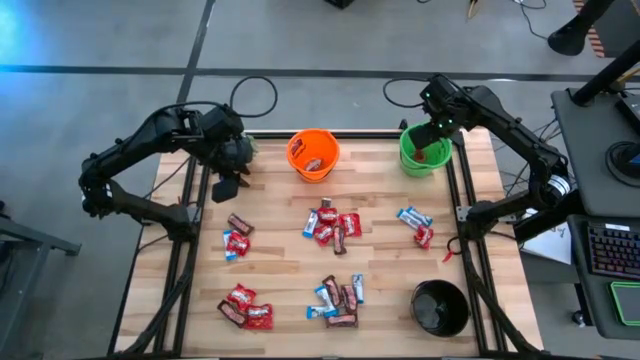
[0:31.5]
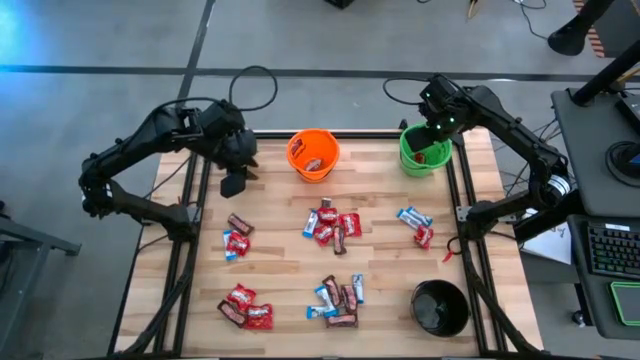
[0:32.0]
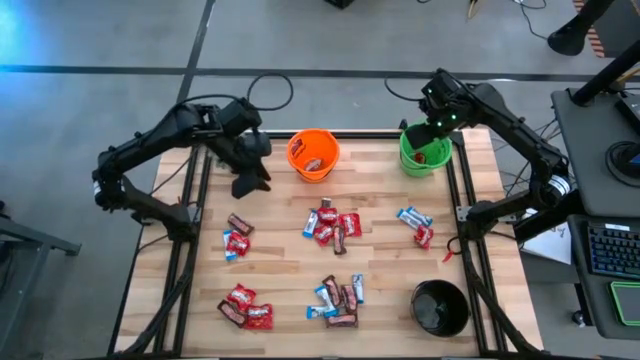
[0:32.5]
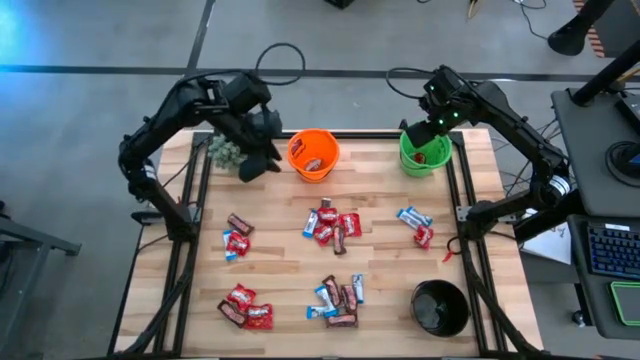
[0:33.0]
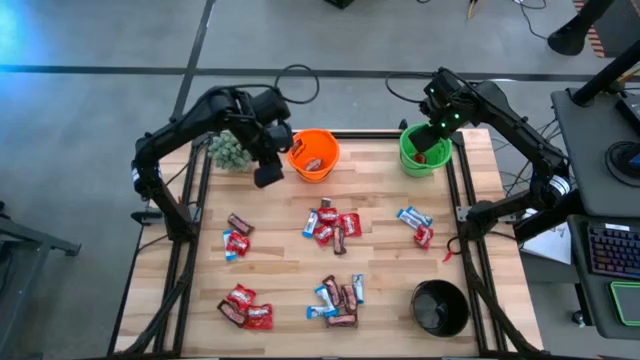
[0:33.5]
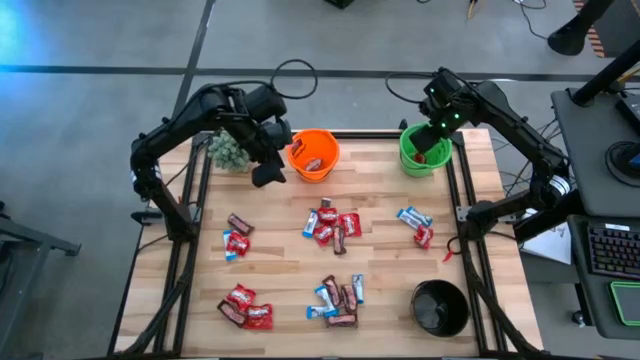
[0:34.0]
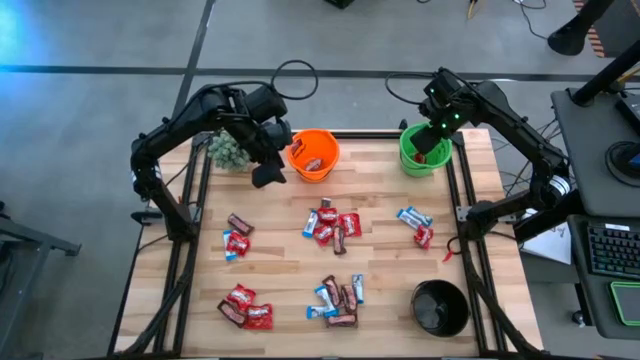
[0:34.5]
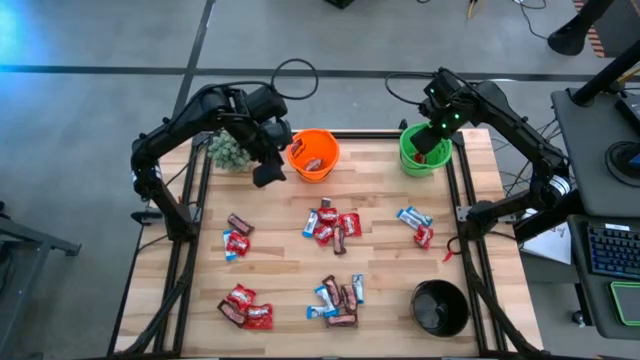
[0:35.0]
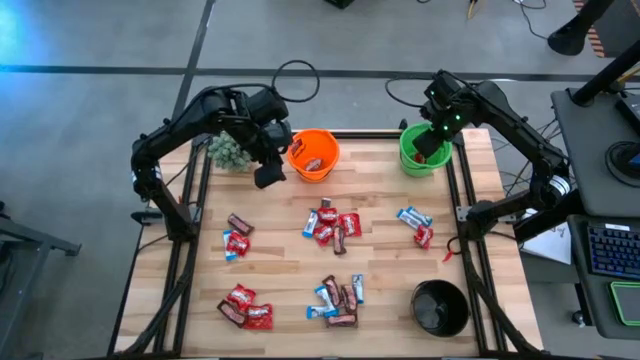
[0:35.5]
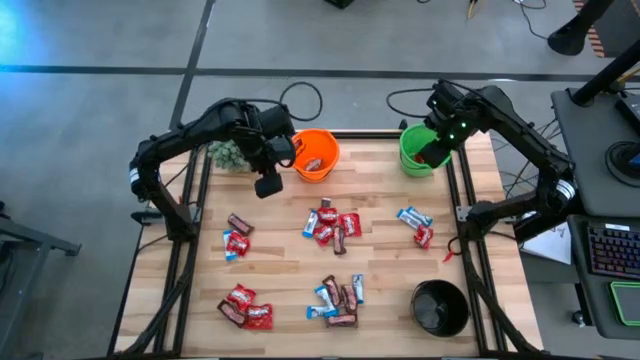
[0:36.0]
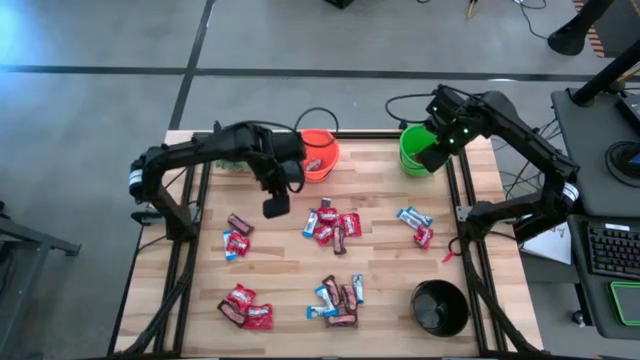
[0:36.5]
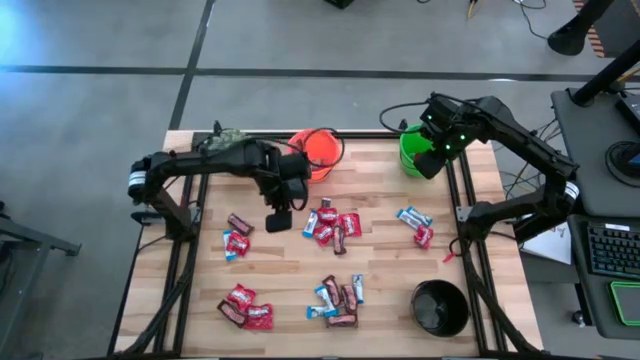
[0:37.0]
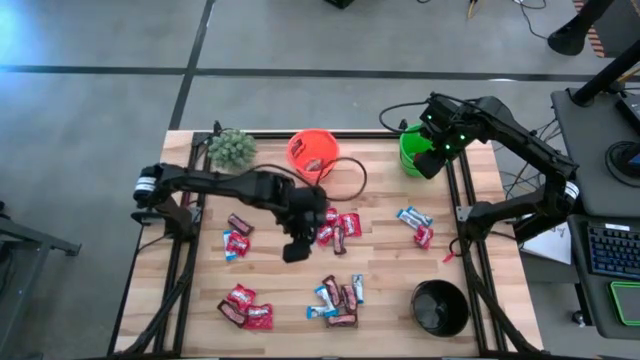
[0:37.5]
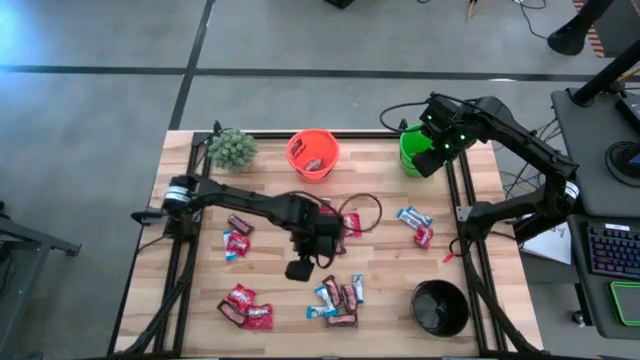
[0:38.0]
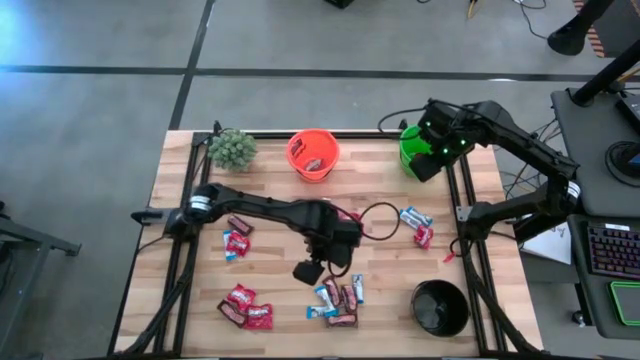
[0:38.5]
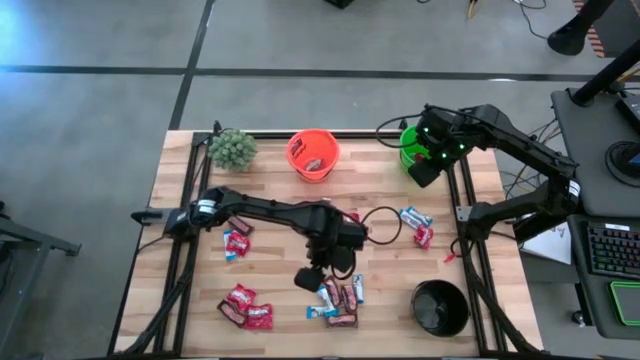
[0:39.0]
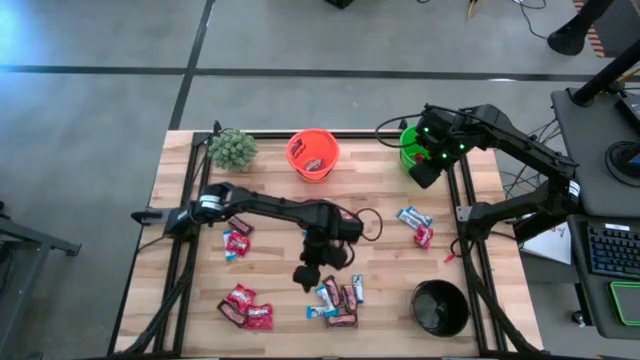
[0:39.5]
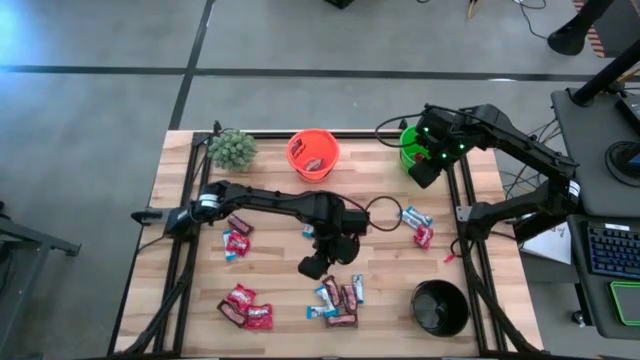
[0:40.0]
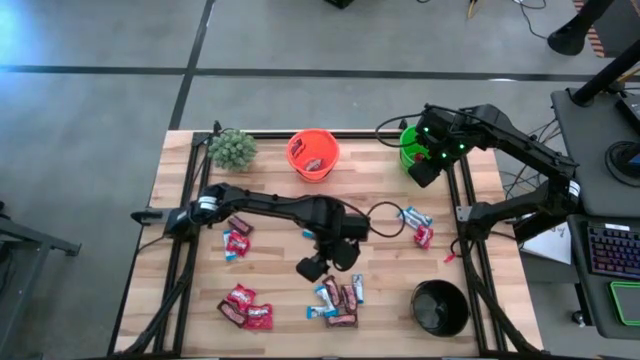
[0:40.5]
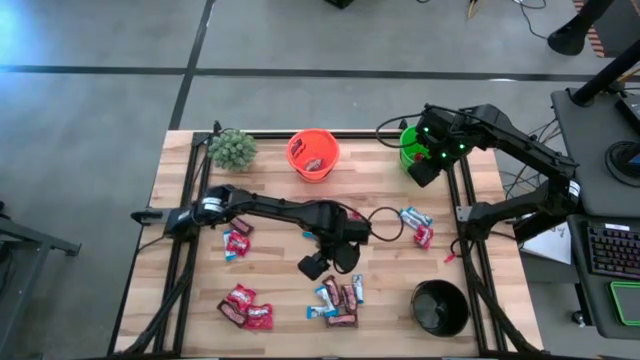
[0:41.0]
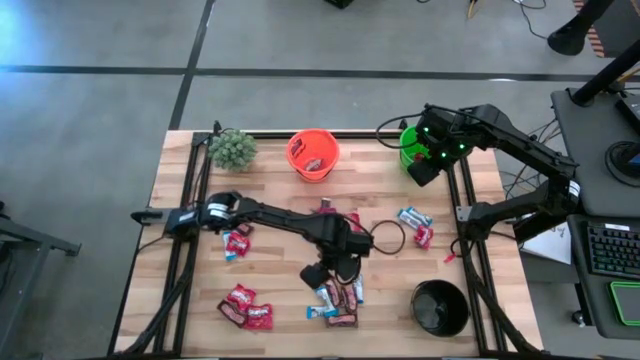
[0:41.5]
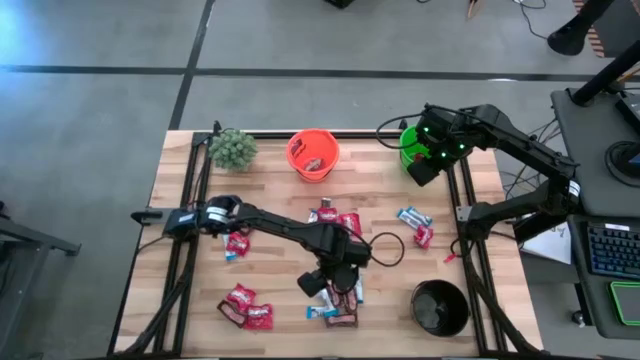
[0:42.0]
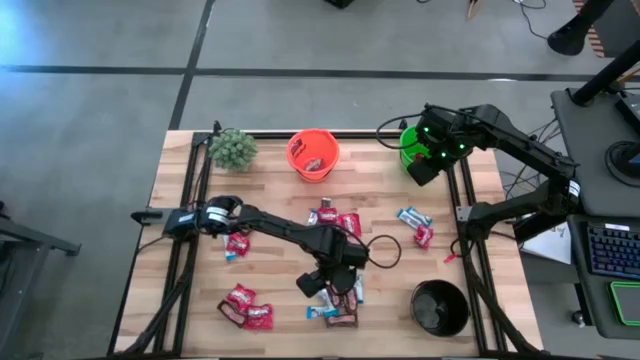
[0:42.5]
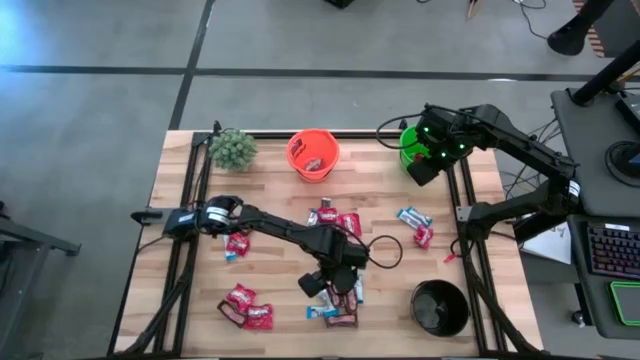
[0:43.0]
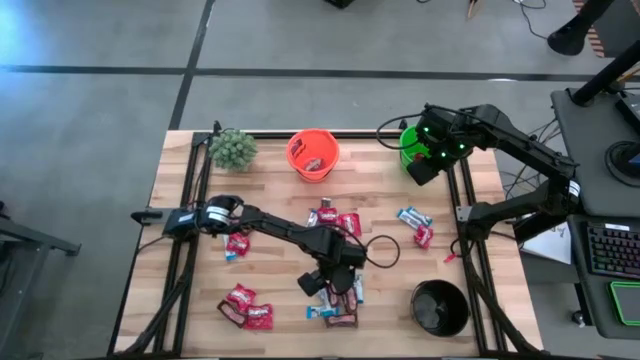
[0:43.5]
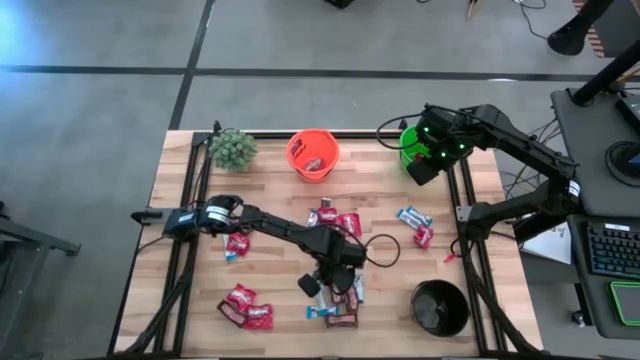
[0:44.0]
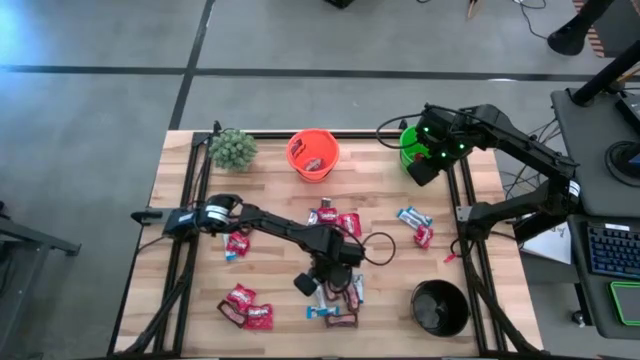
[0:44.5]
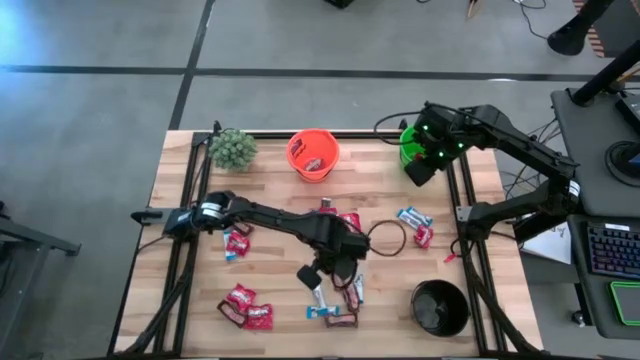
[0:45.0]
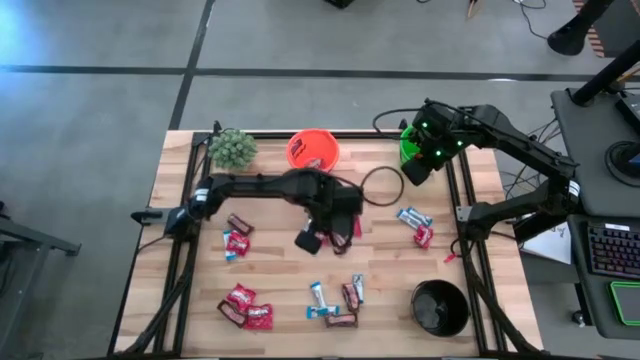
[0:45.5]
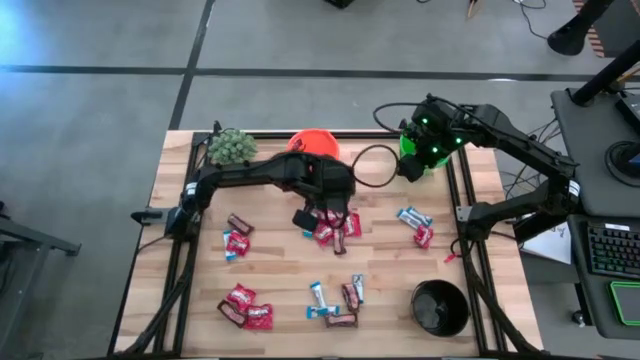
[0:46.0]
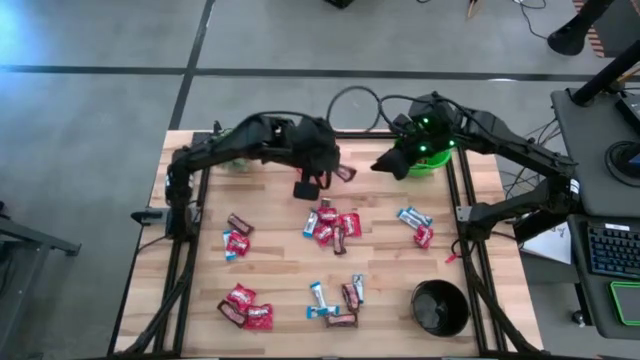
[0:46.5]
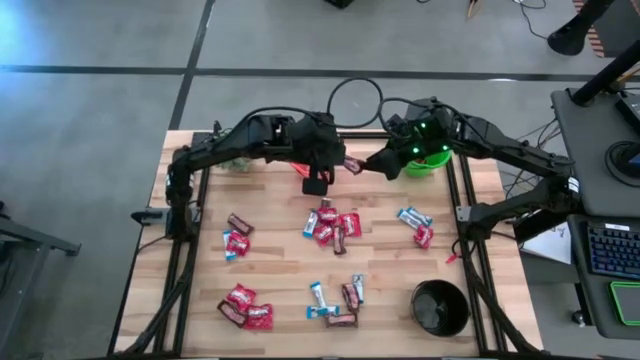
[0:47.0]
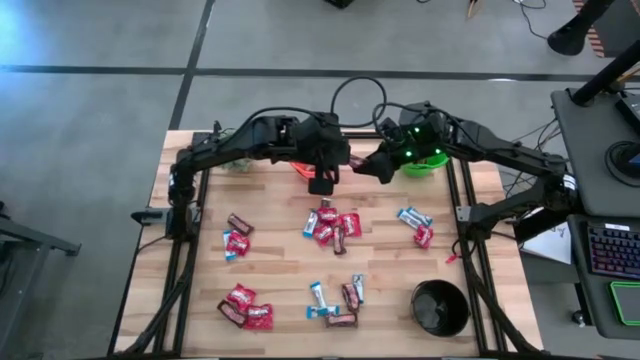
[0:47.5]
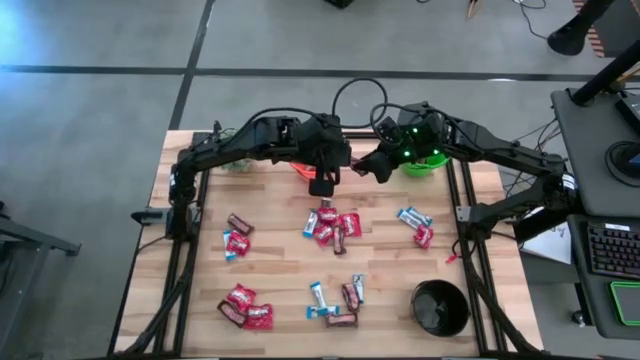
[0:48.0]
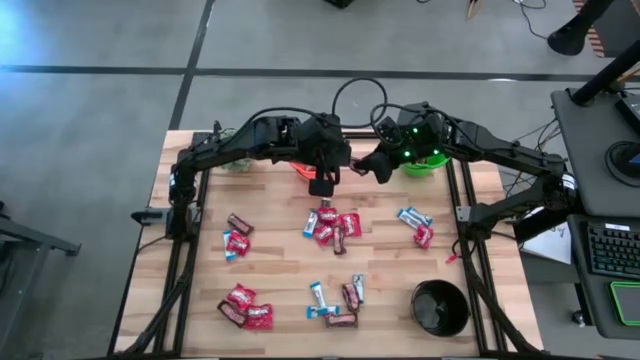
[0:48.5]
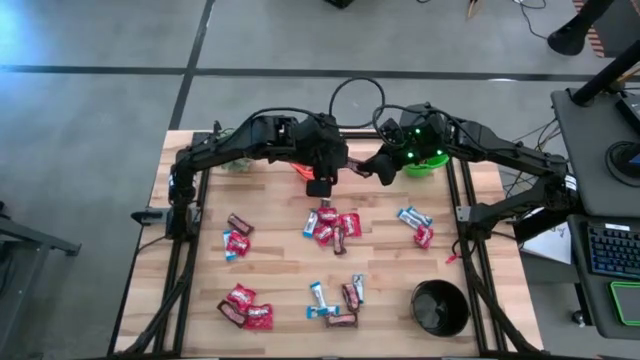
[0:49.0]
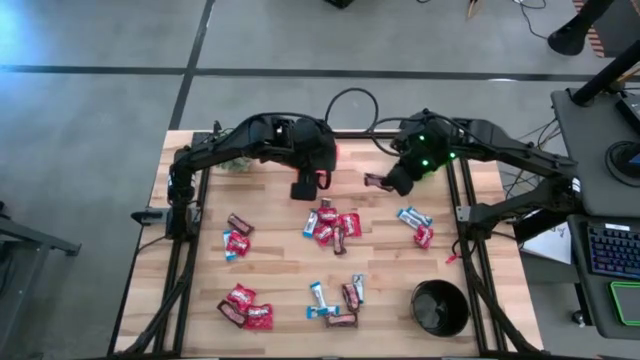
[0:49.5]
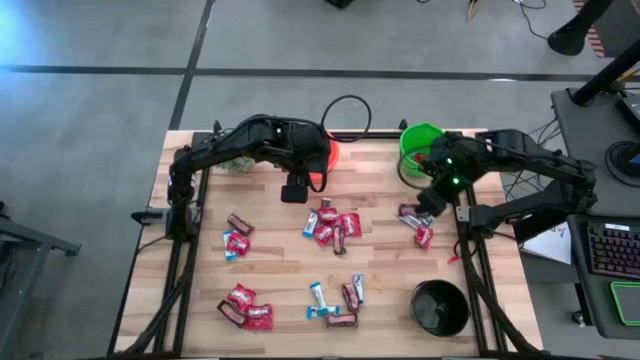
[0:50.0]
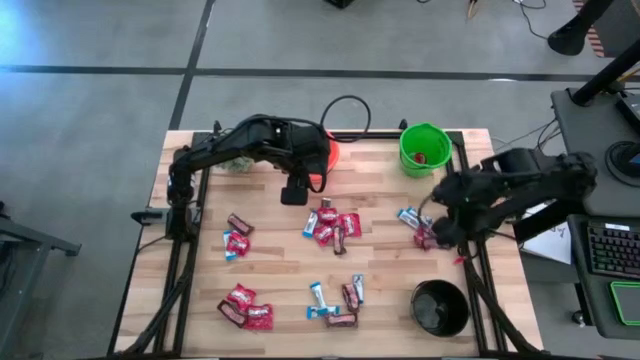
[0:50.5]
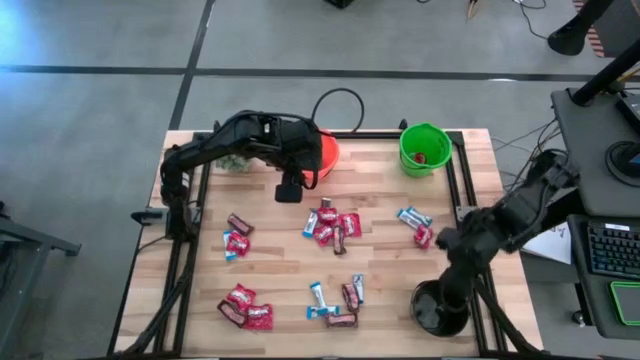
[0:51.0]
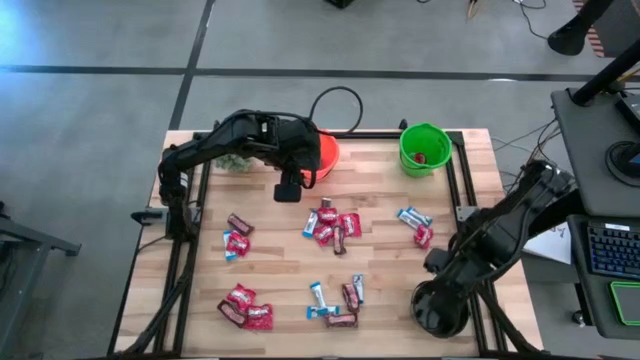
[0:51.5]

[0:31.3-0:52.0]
Task: Sort candy
Put the brown chocolate into the black bucket
